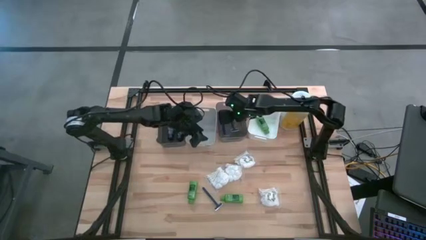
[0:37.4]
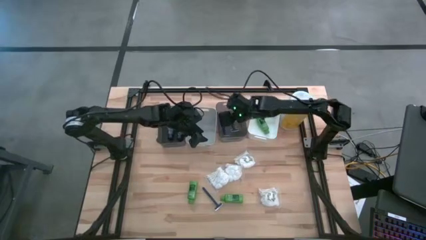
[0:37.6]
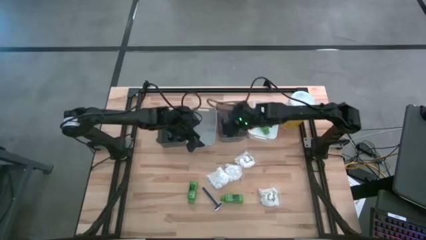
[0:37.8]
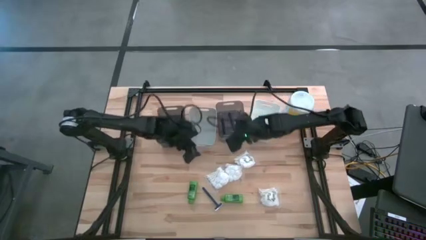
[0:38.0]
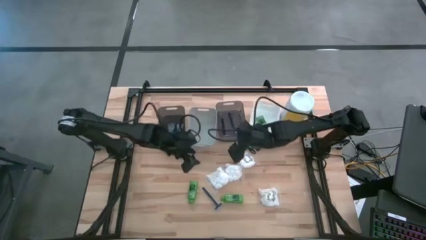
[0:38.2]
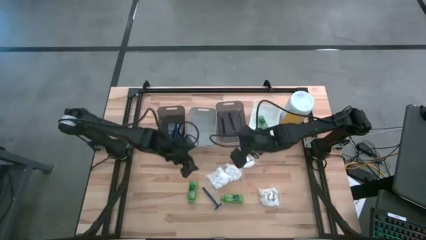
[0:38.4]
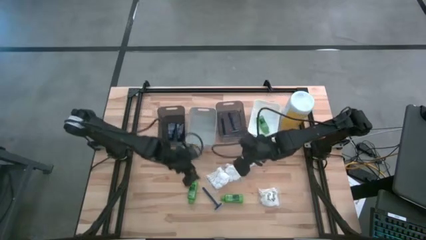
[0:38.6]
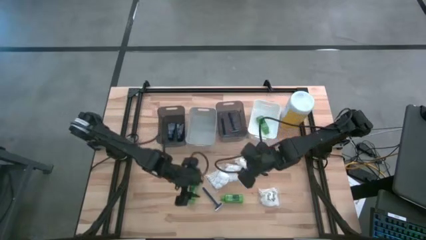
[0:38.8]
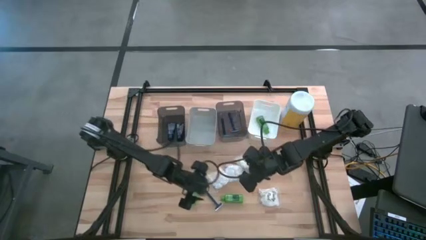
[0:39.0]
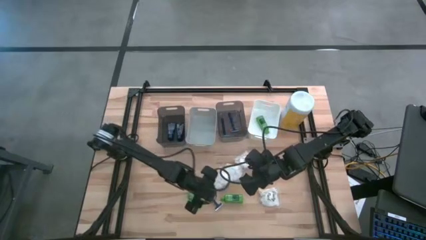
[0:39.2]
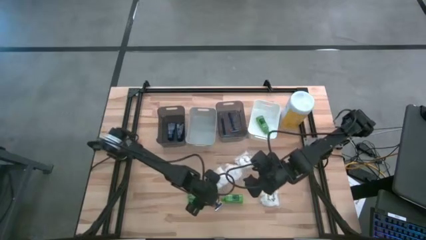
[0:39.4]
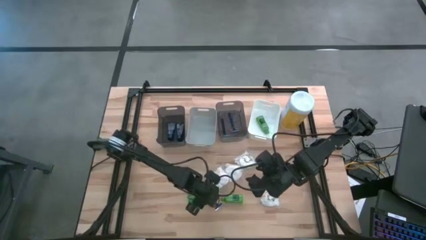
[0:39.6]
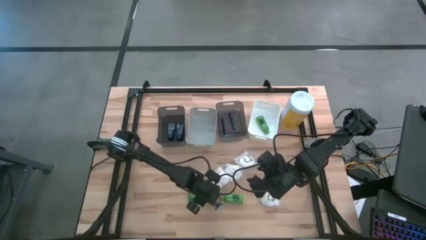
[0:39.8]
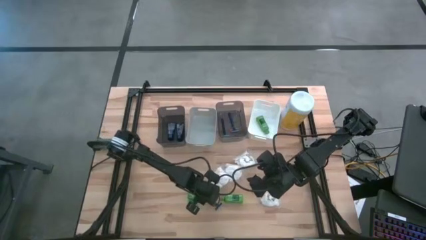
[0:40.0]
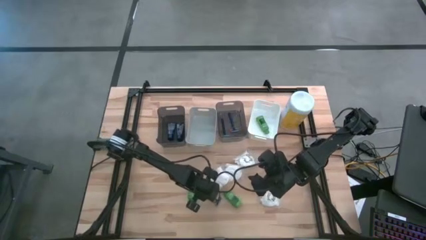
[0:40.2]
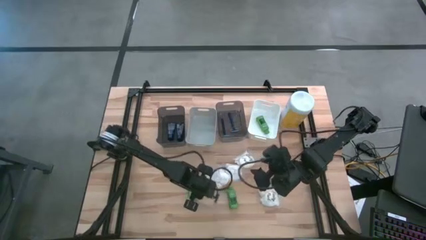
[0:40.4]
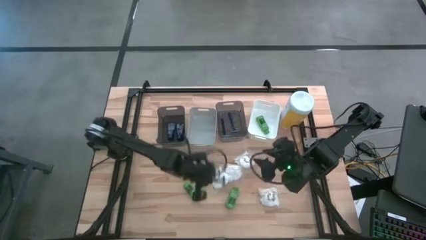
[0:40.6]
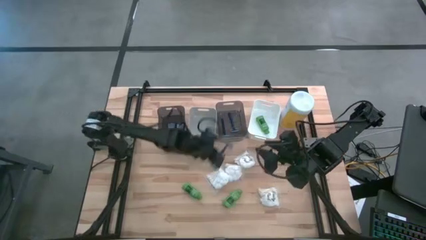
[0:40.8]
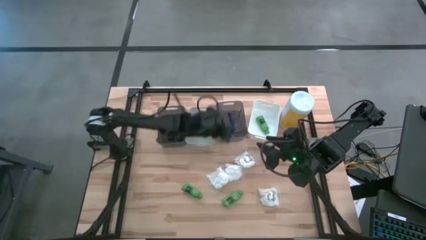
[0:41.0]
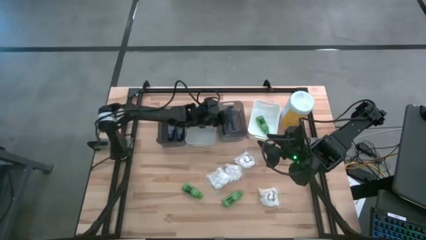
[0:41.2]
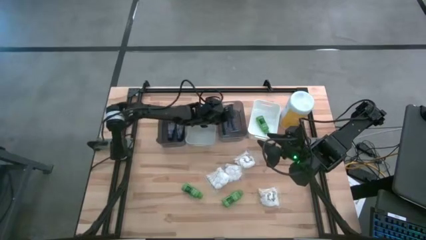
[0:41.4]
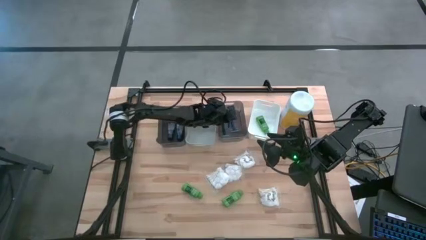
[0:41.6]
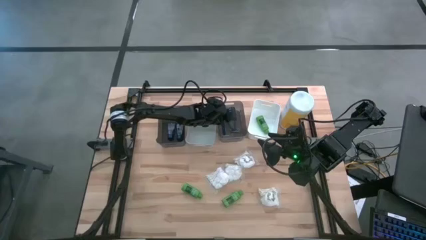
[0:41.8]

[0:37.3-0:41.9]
Task: Pick & Place Travel size toiletries
Put the blue razor into the right black bin

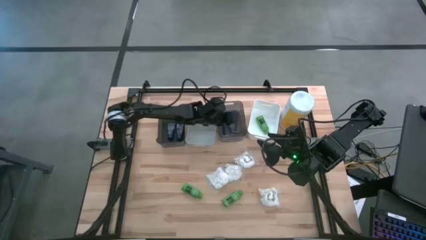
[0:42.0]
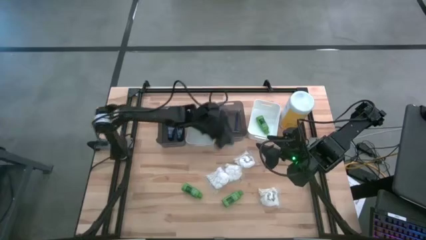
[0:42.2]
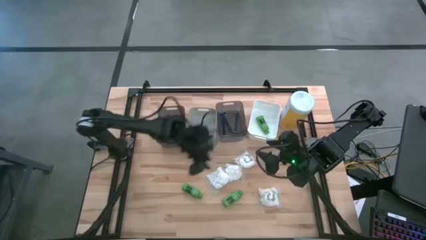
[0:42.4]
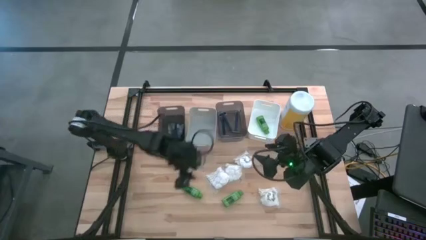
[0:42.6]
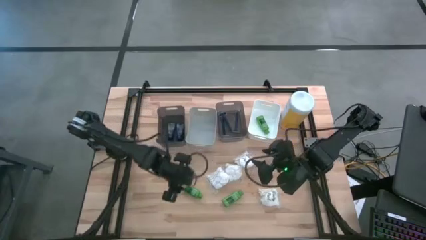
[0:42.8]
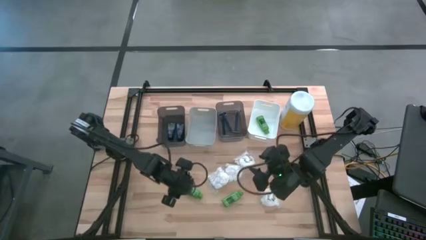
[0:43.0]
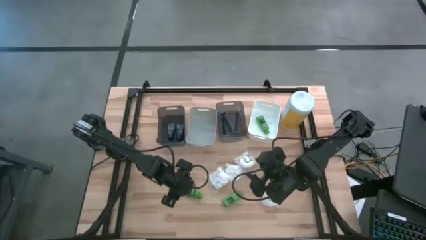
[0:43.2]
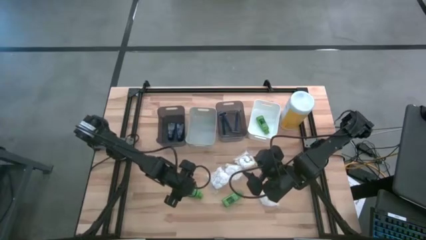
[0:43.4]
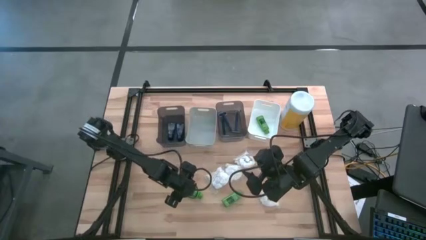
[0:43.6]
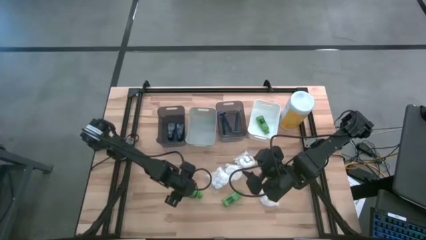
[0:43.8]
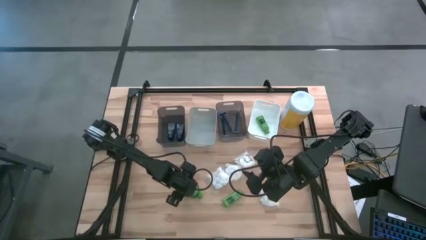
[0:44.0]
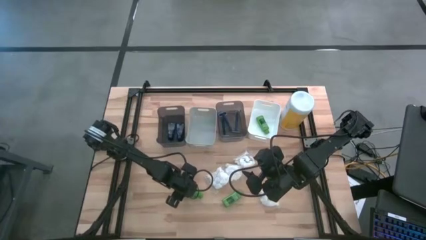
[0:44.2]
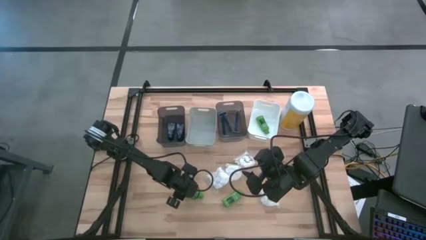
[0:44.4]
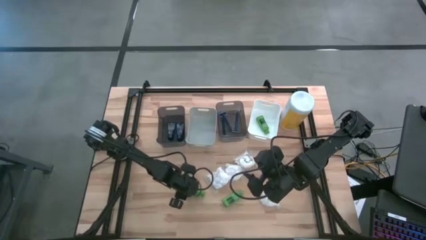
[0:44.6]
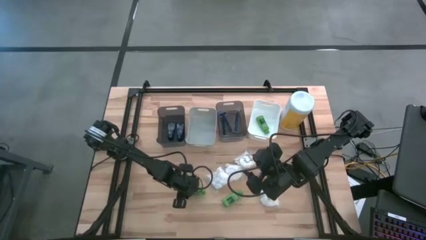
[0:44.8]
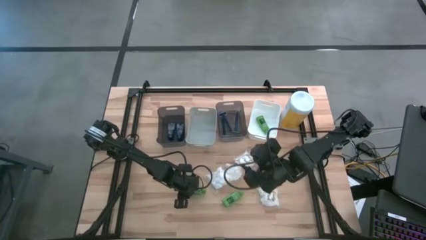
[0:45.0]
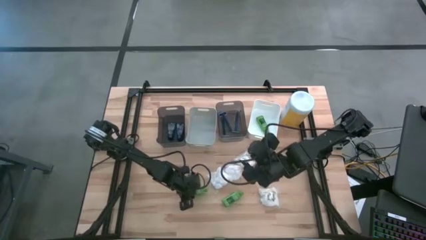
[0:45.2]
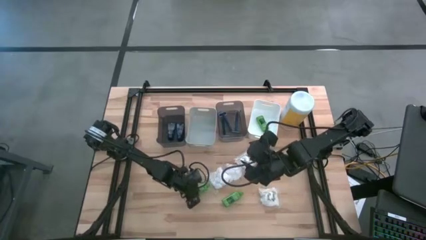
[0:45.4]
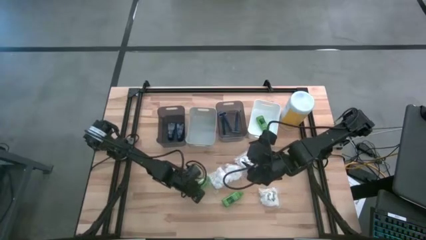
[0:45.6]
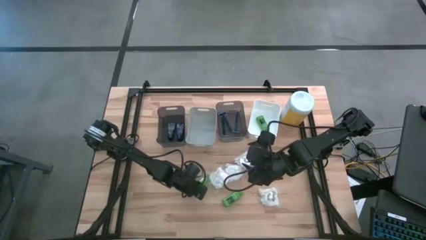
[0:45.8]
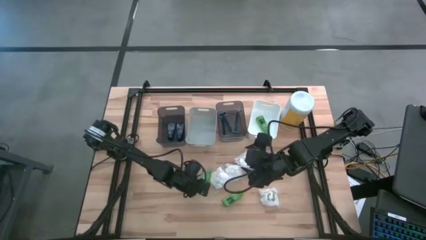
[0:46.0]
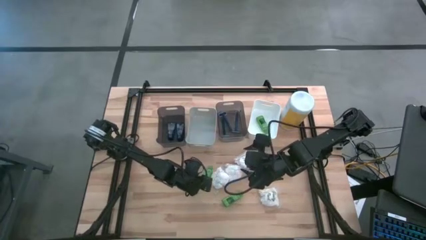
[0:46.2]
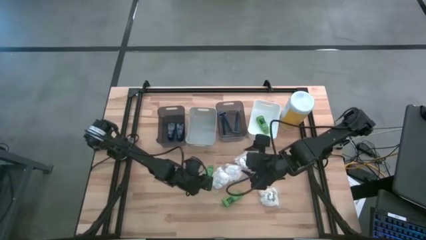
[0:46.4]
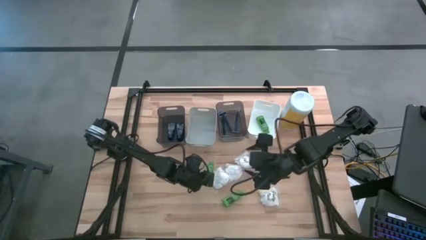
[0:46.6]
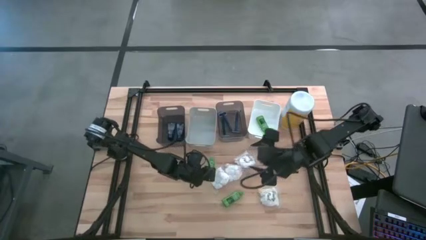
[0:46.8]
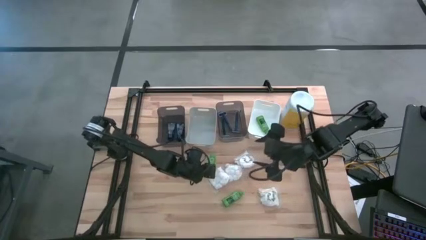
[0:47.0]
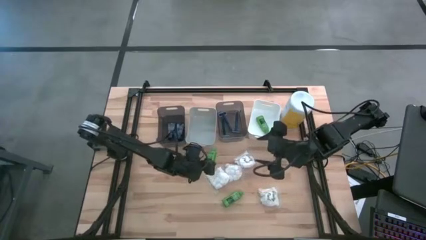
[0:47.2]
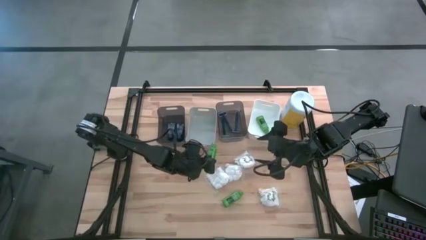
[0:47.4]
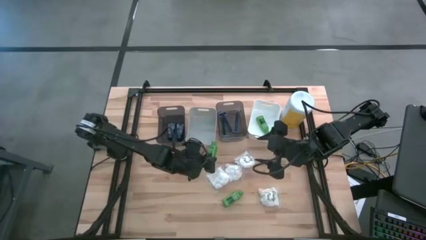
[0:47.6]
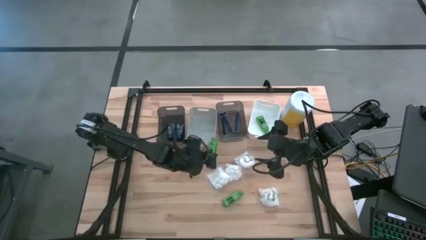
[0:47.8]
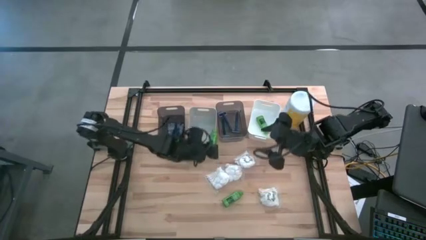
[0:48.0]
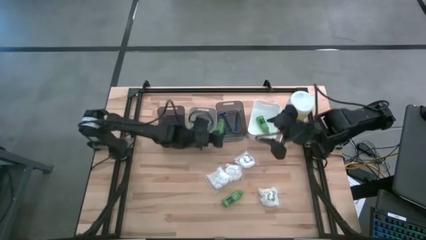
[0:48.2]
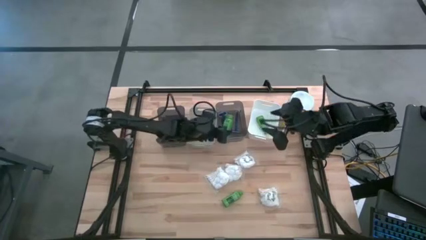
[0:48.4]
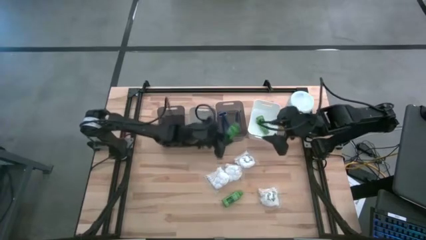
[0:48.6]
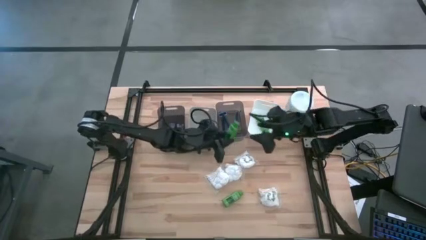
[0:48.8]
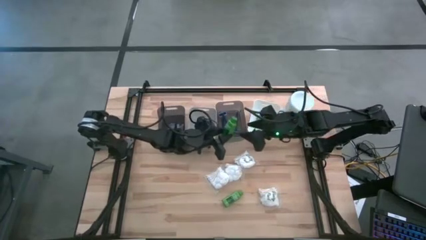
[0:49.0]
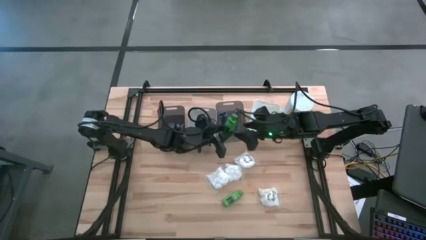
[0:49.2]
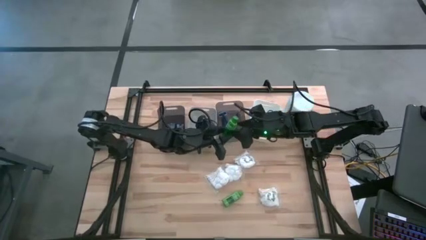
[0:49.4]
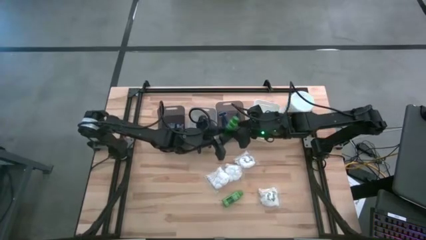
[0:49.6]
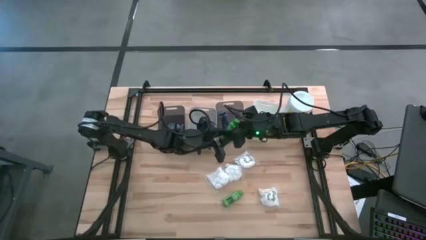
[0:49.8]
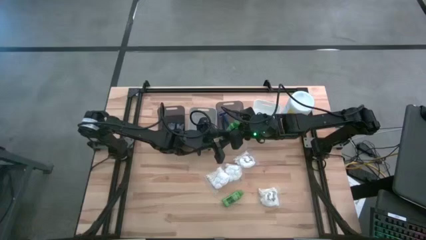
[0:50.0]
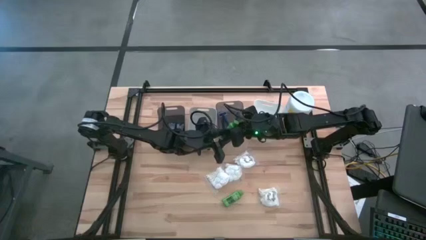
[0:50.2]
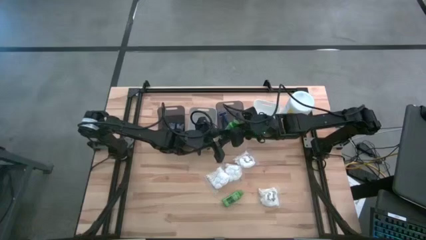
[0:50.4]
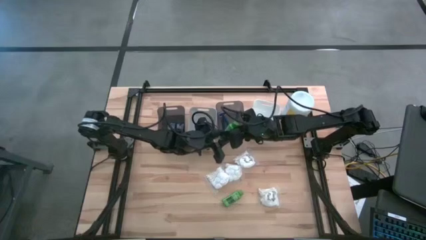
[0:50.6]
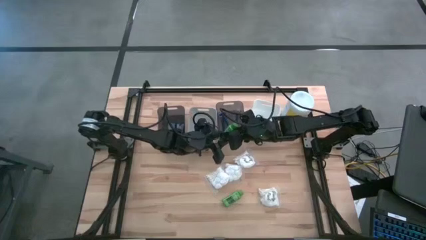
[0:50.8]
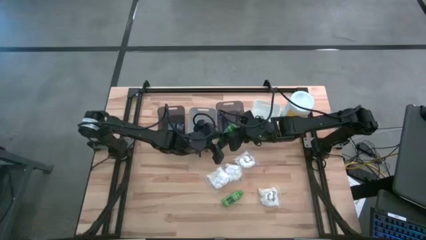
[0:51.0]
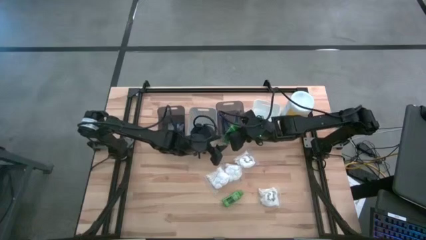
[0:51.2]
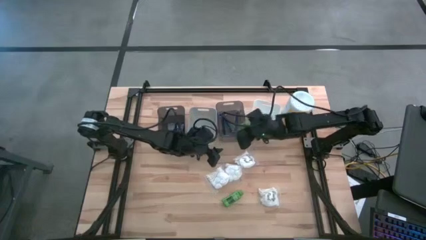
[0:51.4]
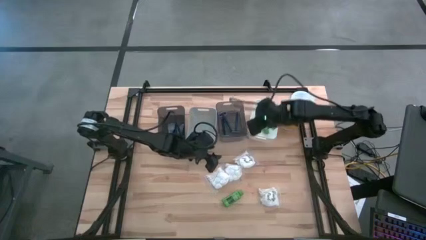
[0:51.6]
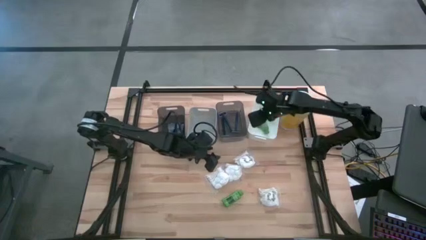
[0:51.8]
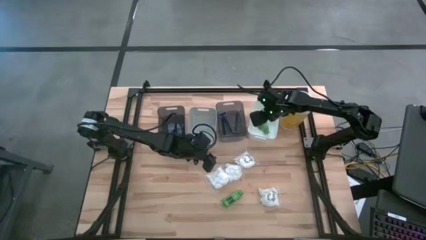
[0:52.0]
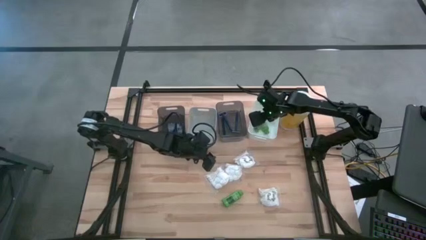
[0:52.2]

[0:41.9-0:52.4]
Put the green shampoo into the white bin

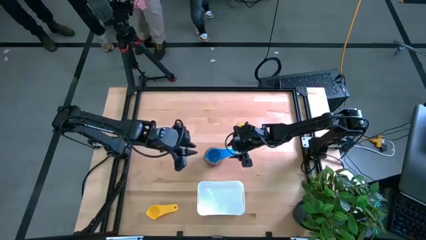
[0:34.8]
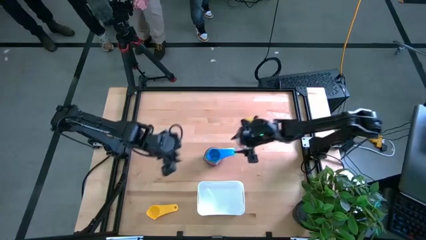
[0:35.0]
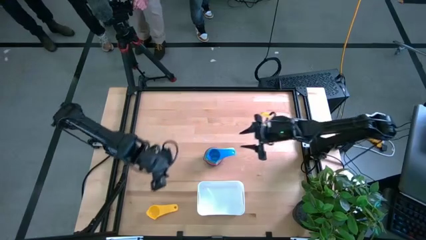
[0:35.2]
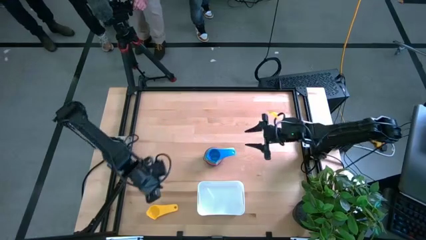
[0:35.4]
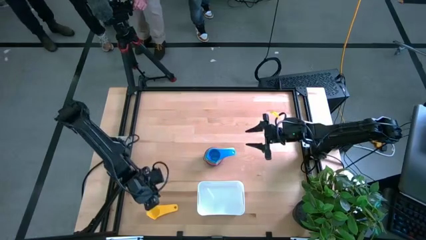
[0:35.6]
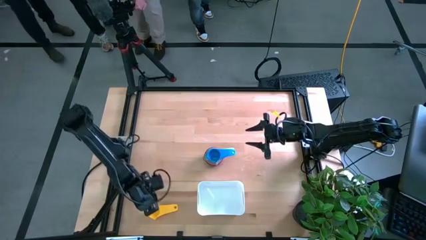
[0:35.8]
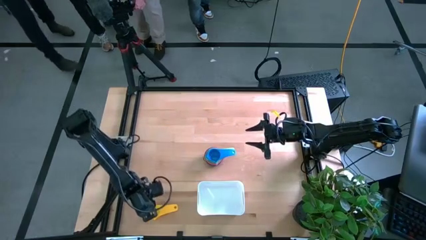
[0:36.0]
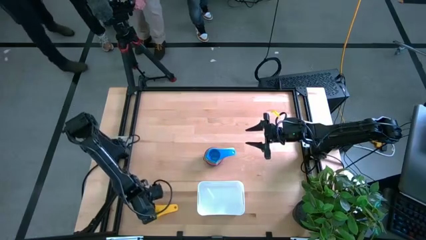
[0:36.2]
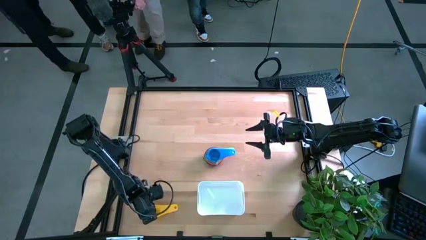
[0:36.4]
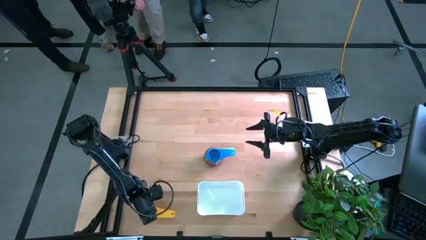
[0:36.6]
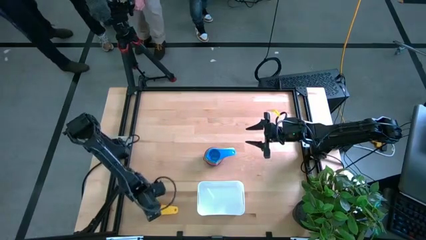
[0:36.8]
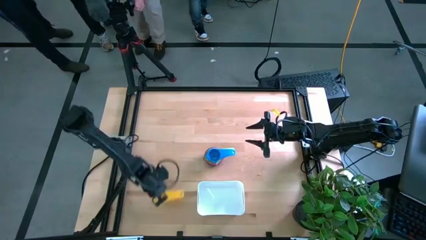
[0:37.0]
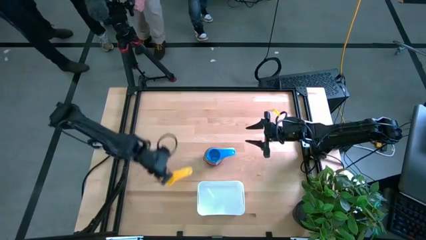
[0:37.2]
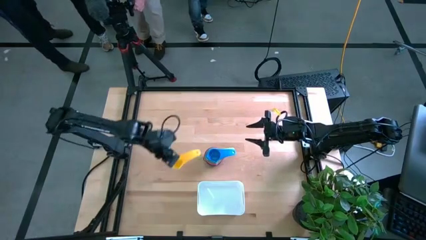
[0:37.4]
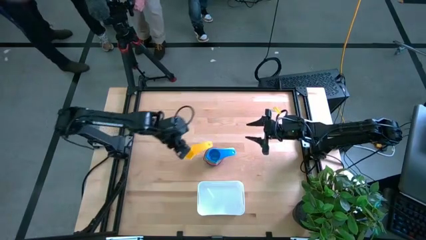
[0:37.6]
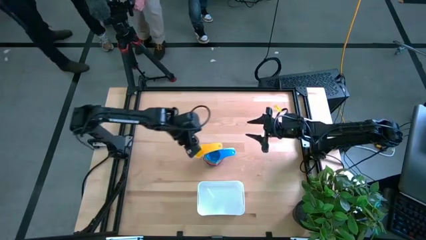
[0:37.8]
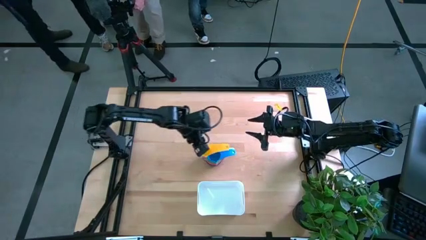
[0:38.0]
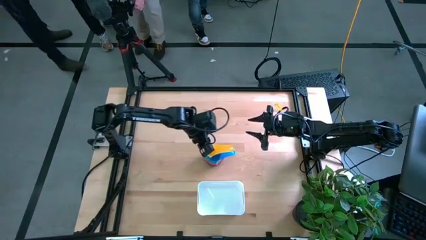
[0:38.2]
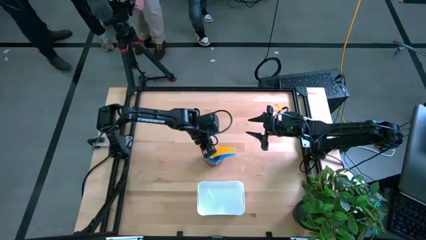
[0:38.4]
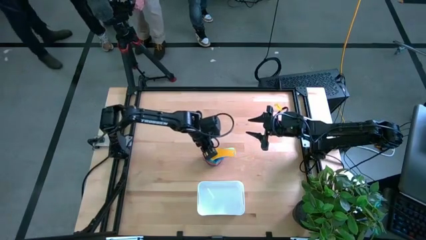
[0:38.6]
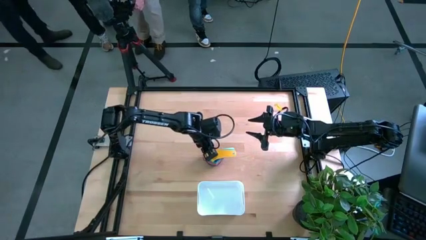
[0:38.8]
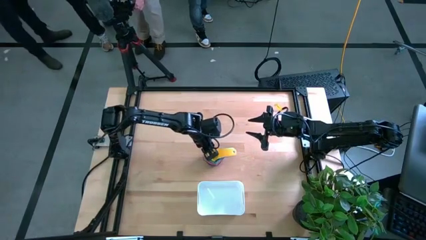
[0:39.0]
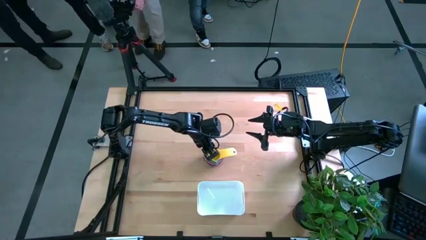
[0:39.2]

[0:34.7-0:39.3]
Task: Nest measuring cups in basket
Stack the yellow measuring cup on the blue measuring cup
